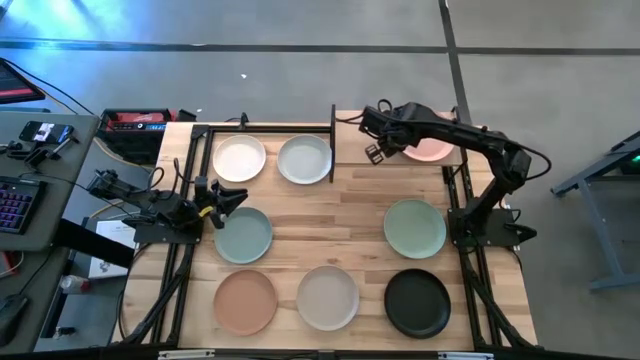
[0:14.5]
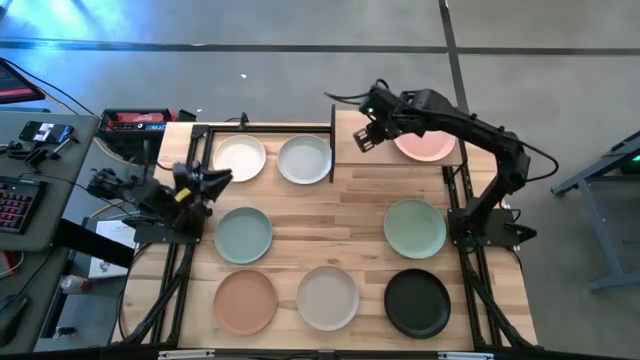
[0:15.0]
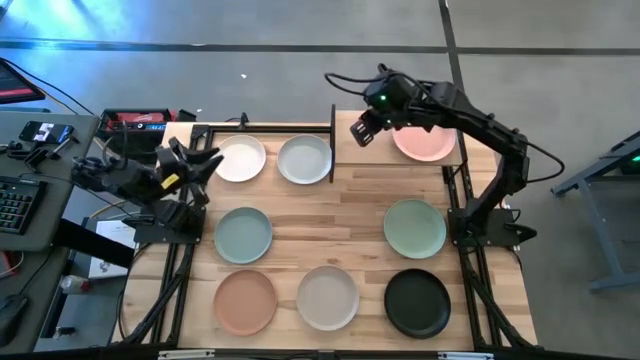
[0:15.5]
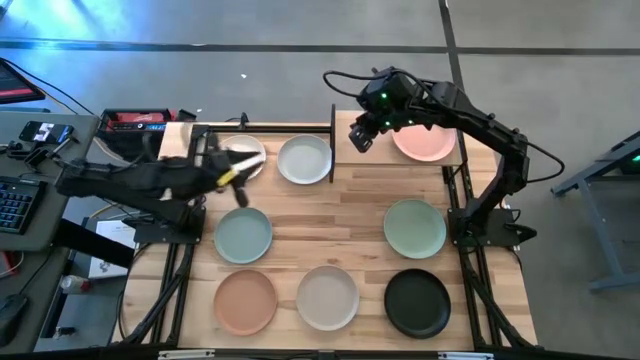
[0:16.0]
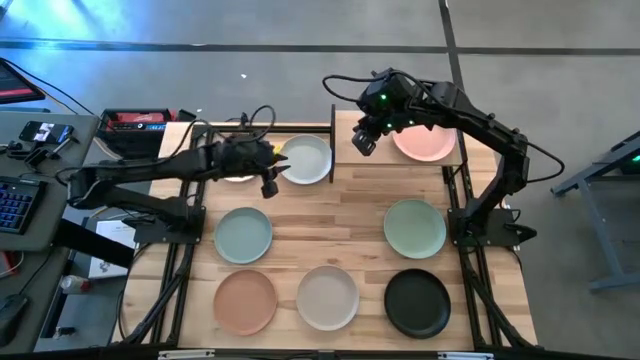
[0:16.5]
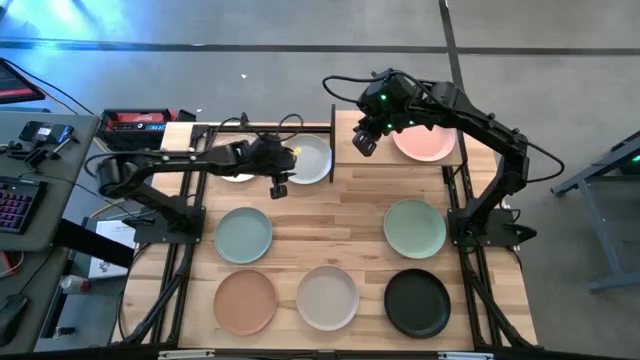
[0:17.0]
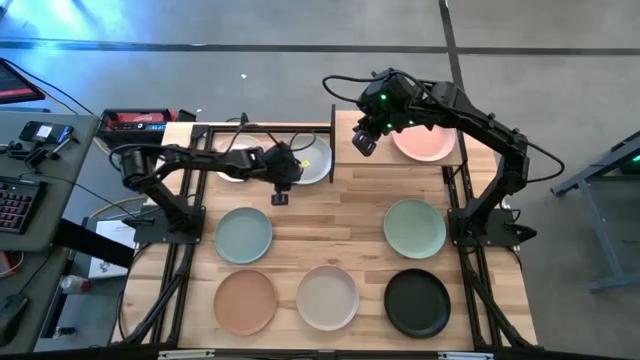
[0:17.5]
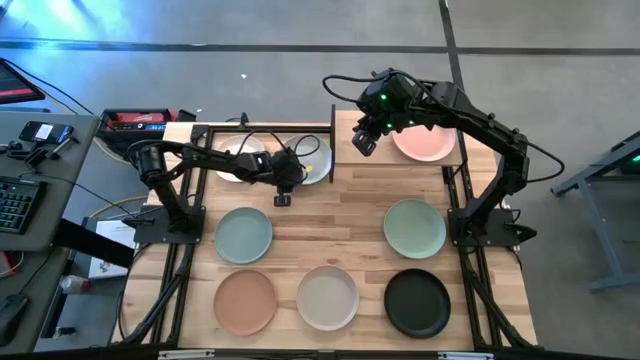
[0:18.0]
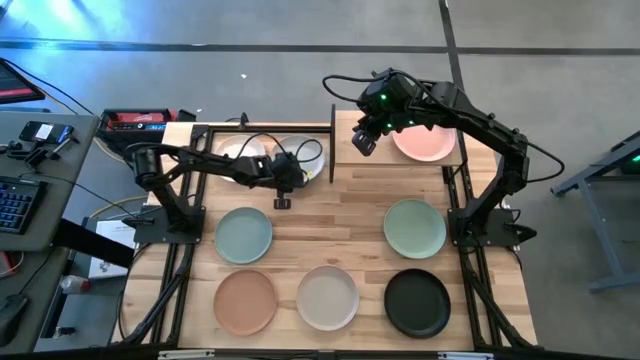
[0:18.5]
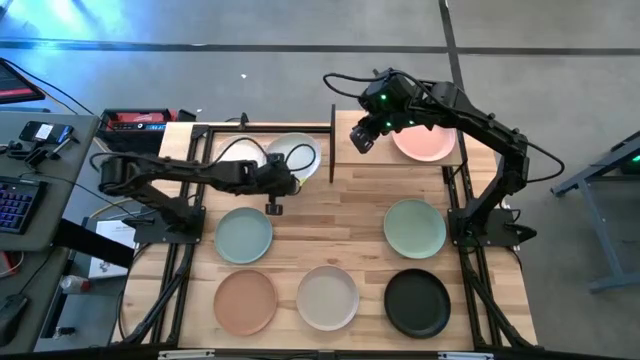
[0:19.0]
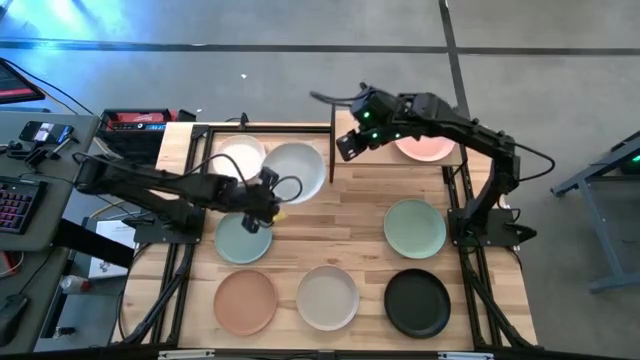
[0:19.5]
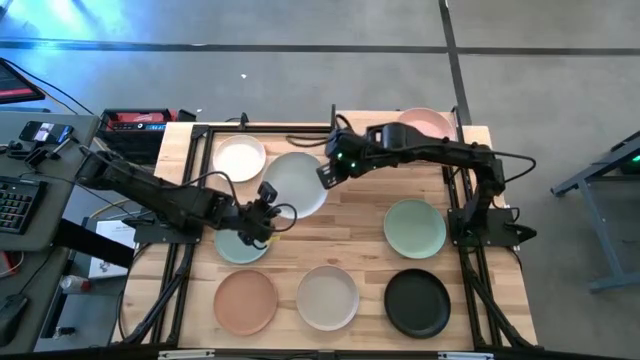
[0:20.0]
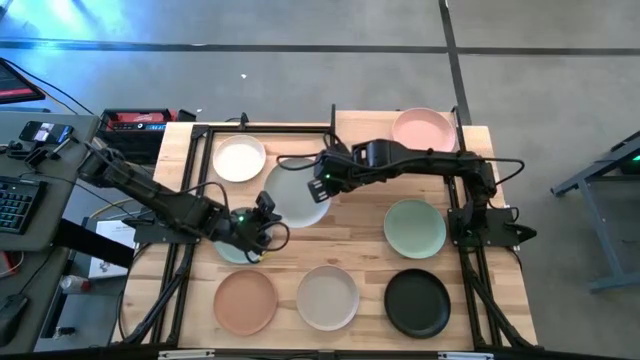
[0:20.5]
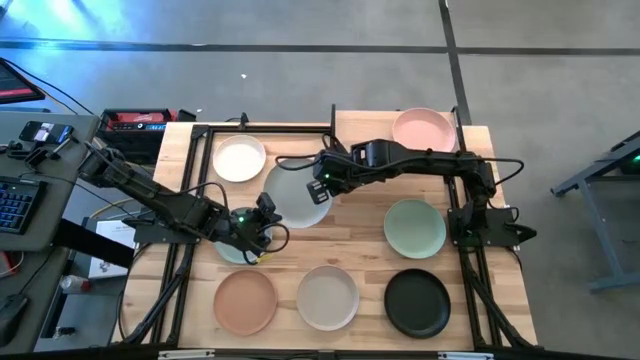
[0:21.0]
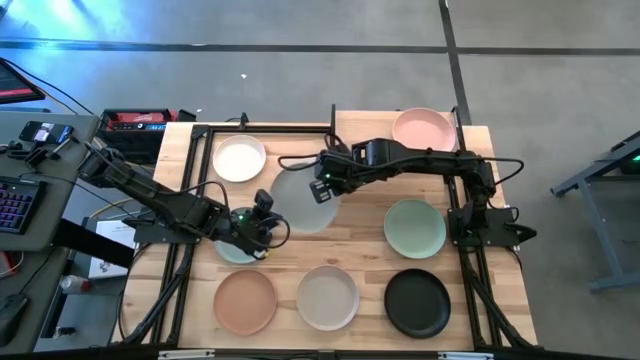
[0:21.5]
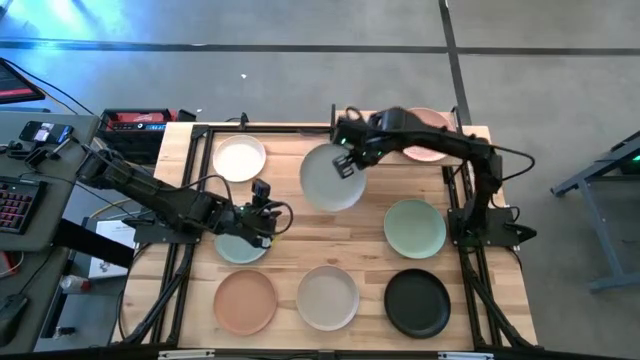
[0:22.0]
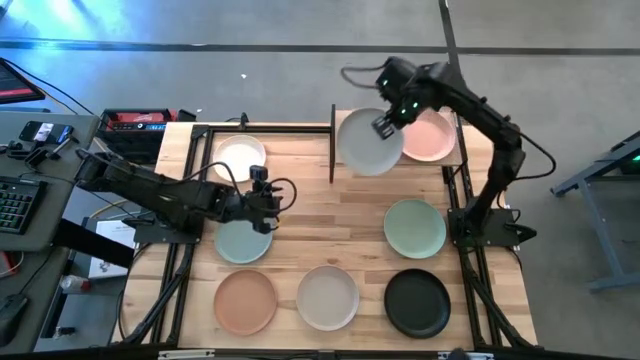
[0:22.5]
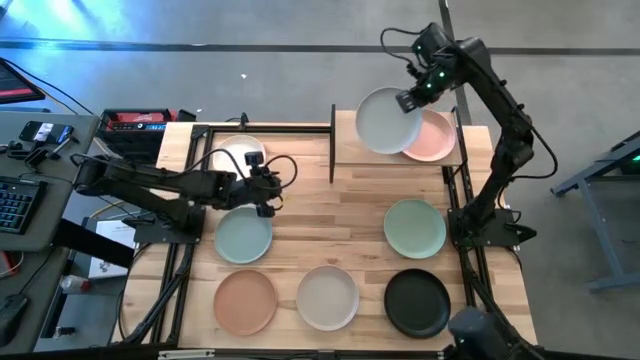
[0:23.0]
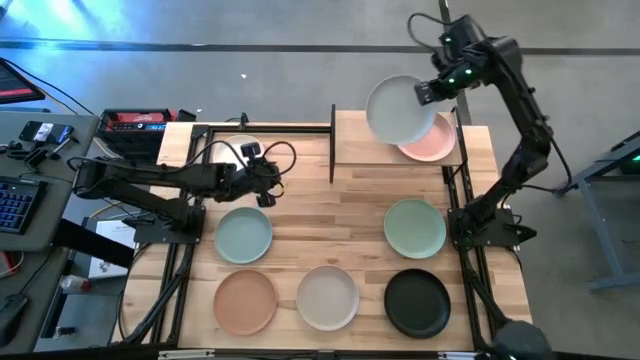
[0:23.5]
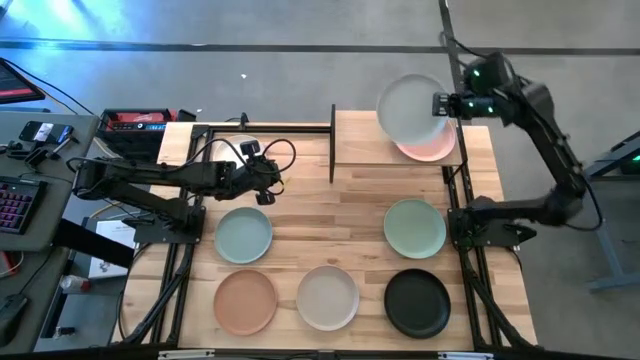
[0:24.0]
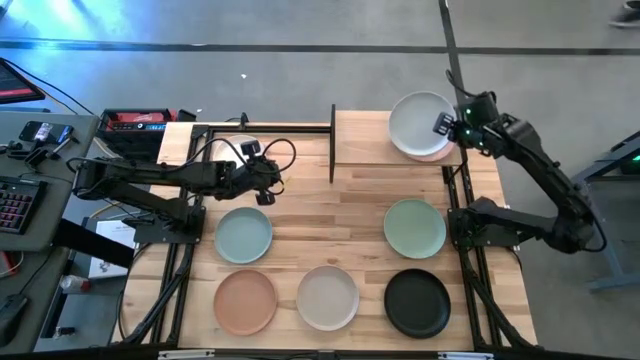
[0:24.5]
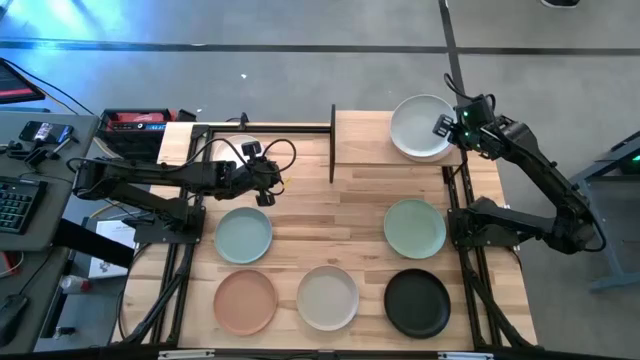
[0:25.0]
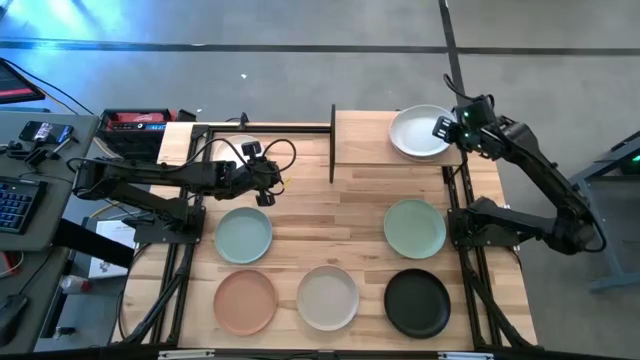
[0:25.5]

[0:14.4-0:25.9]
Task: Place and stack plates onto a shelf
Stack the light blue plate on top of the light orange plate on the shelf

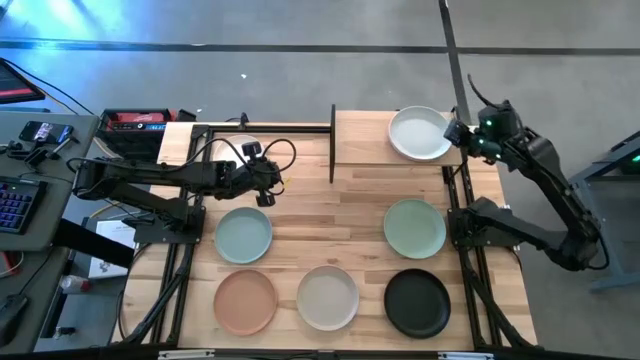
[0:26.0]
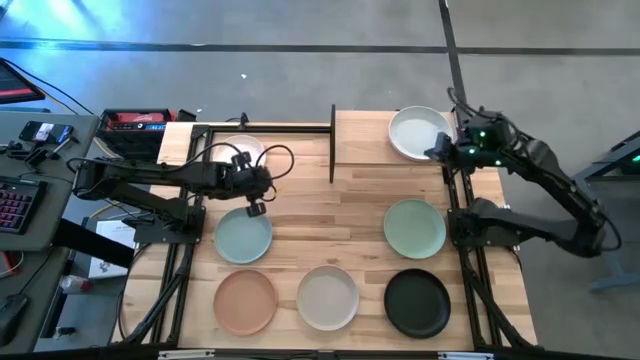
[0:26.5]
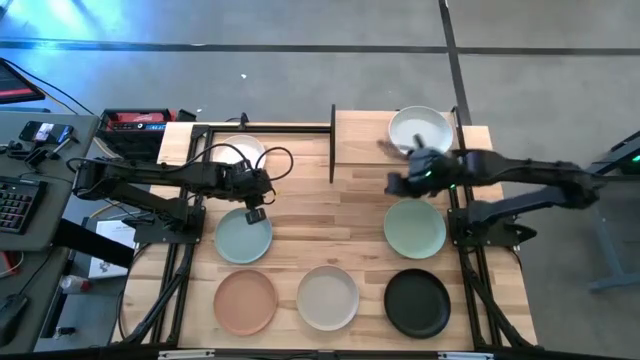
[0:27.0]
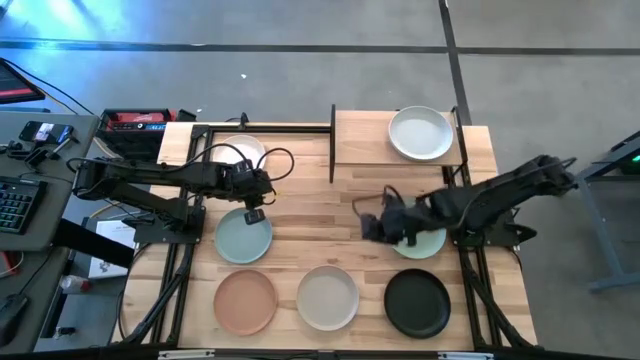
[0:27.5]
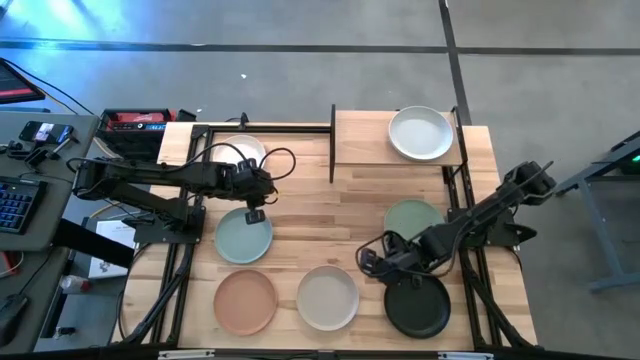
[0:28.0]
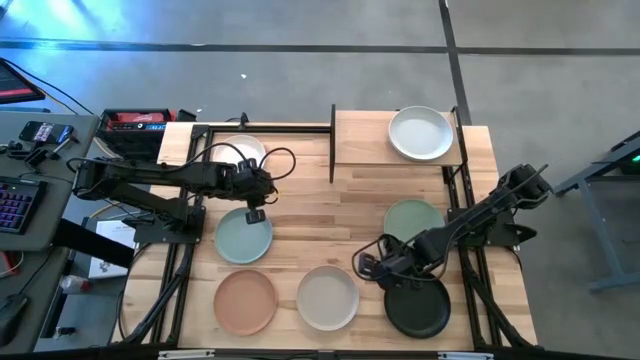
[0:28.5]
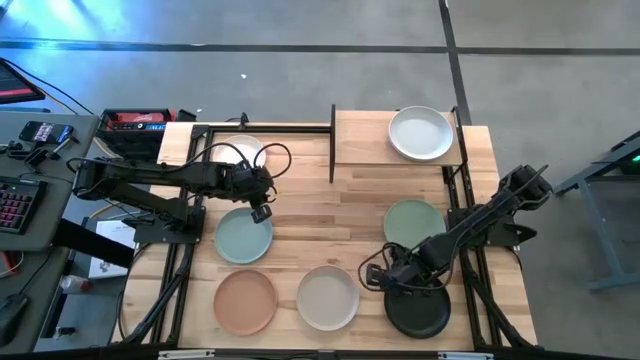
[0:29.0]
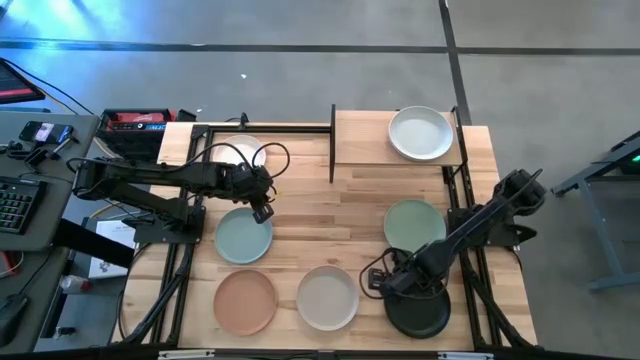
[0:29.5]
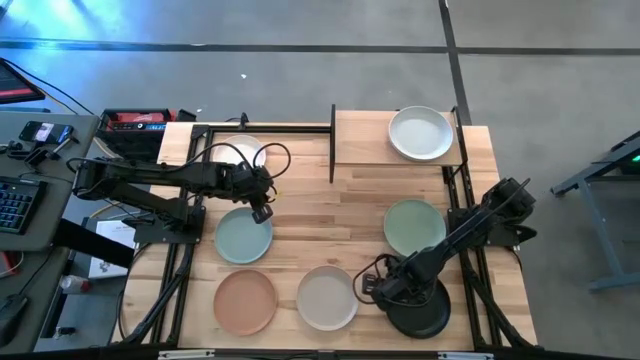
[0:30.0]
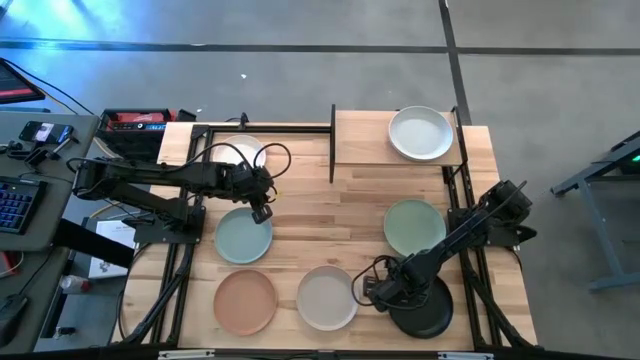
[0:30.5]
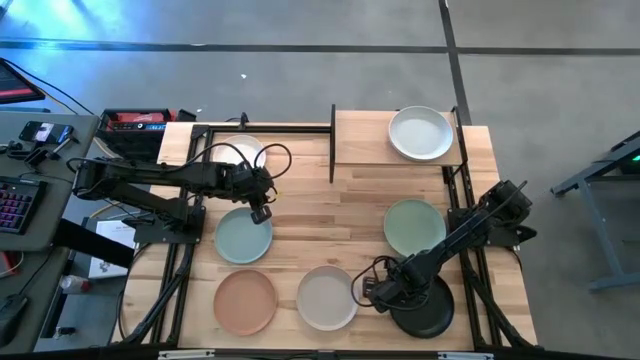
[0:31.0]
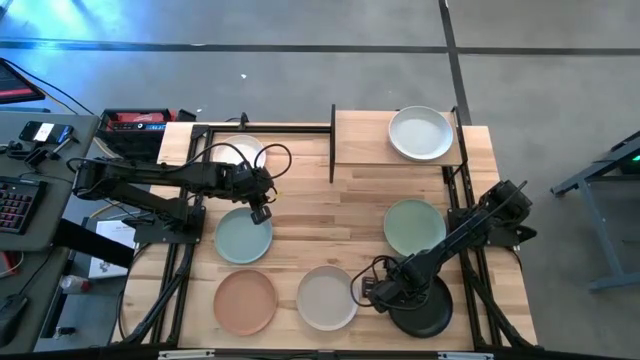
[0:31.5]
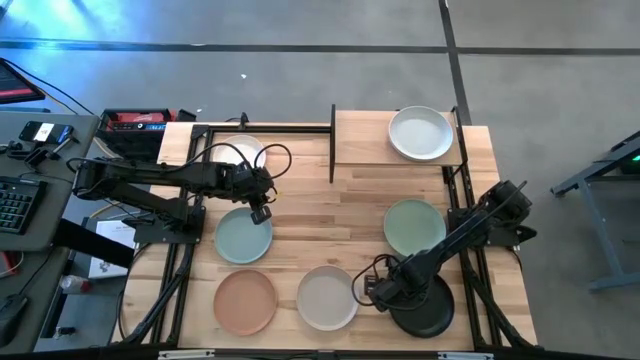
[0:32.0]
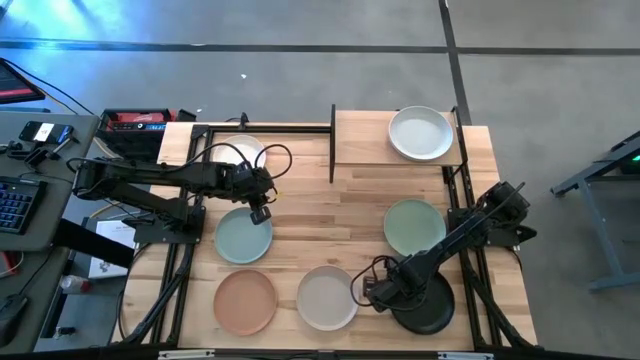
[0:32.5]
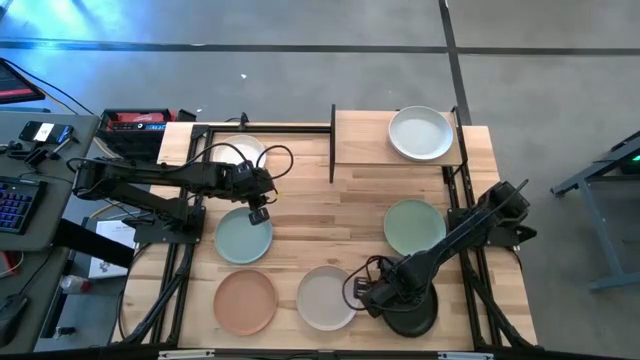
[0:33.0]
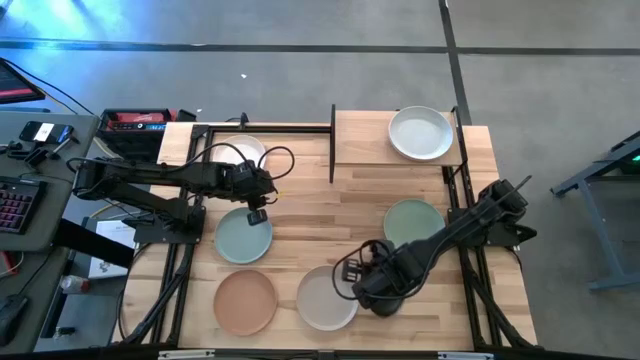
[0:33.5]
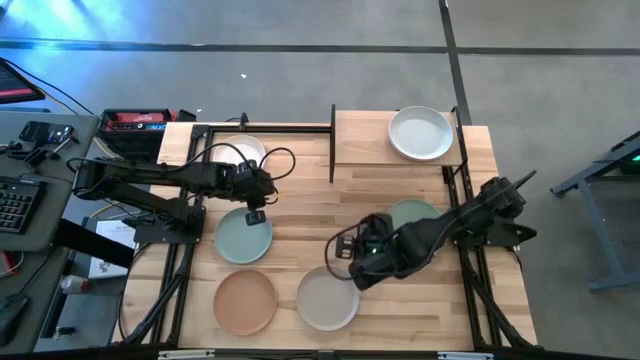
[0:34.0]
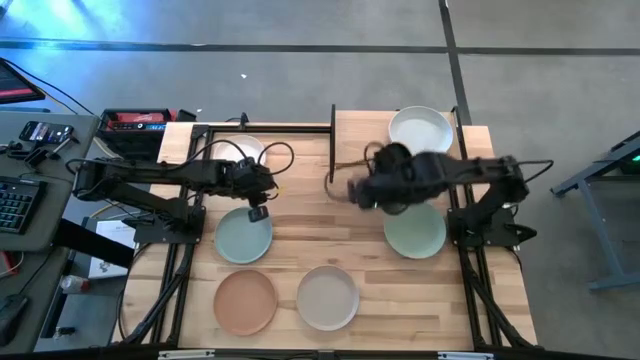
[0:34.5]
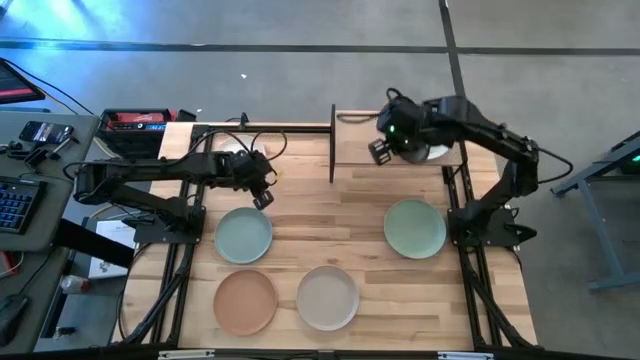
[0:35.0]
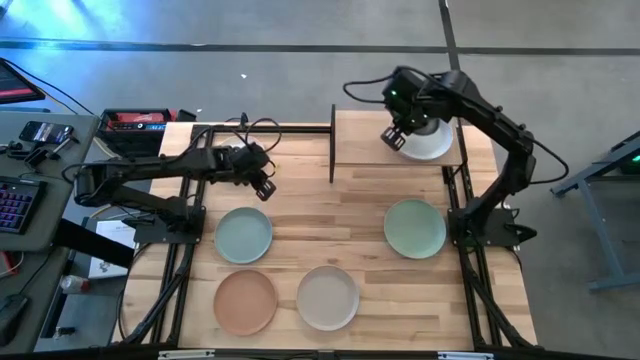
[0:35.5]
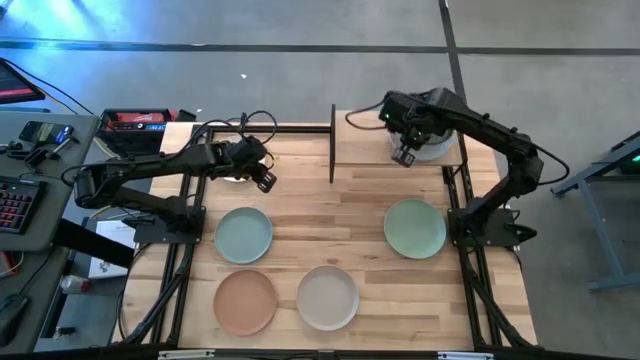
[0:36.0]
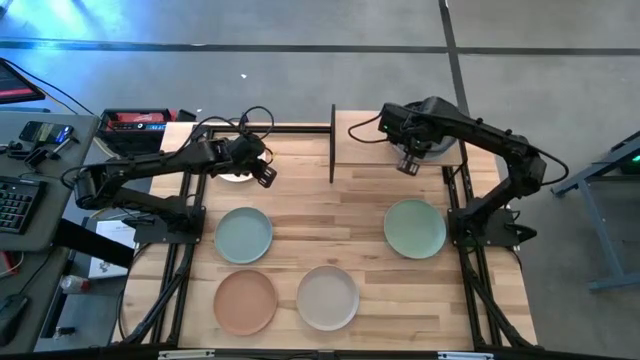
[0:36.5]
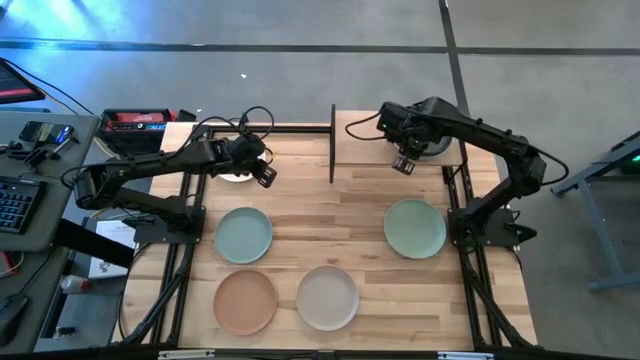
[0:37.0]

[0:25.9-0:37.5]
Stack the black plate on top of the light blue plate on the shelf
